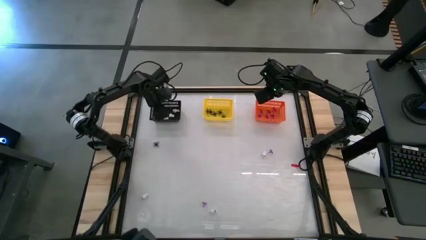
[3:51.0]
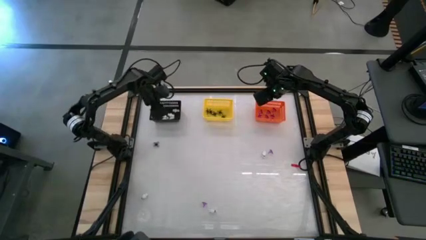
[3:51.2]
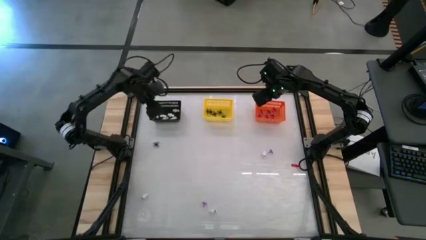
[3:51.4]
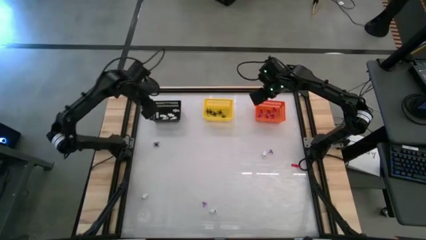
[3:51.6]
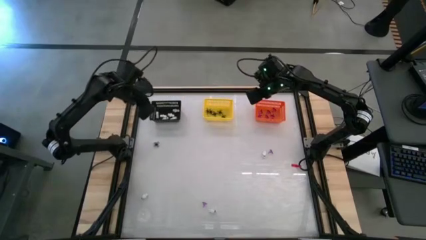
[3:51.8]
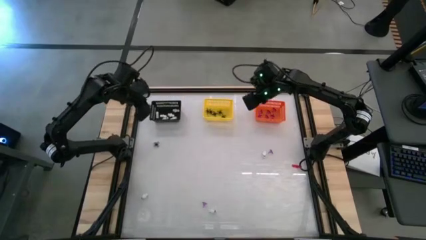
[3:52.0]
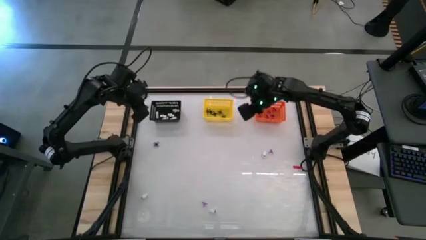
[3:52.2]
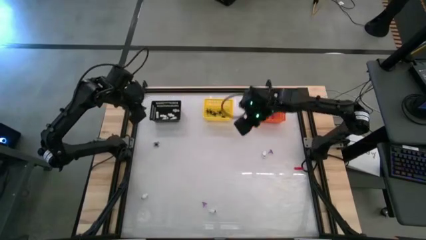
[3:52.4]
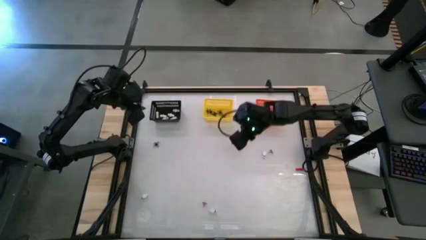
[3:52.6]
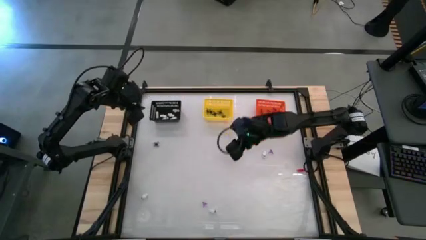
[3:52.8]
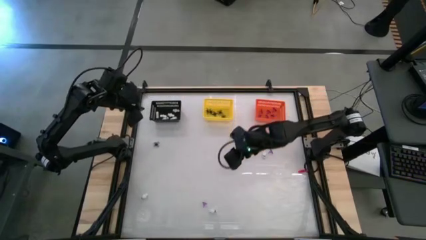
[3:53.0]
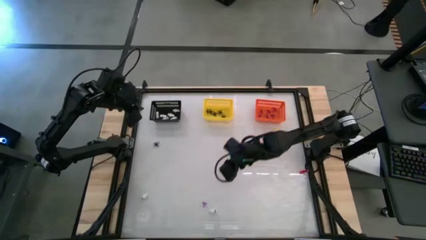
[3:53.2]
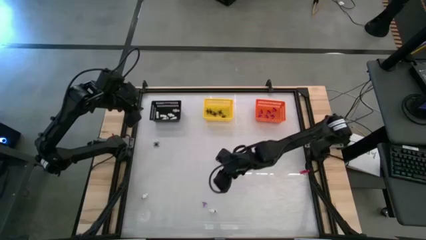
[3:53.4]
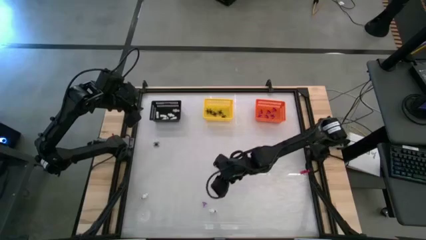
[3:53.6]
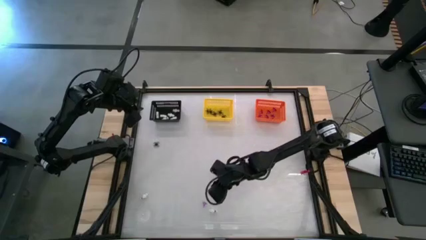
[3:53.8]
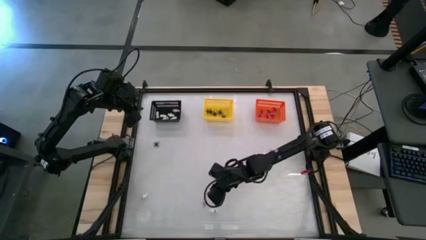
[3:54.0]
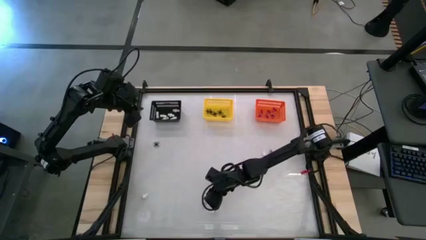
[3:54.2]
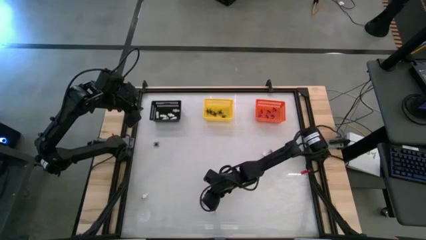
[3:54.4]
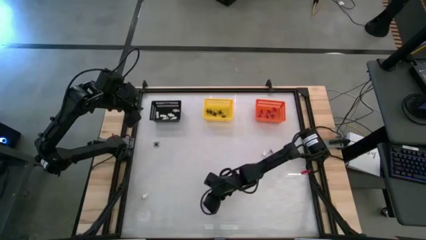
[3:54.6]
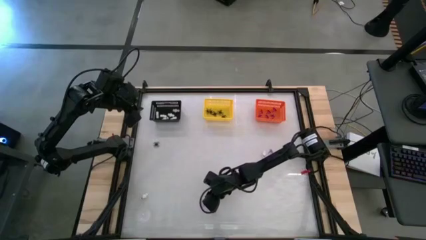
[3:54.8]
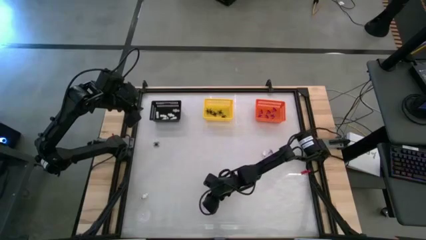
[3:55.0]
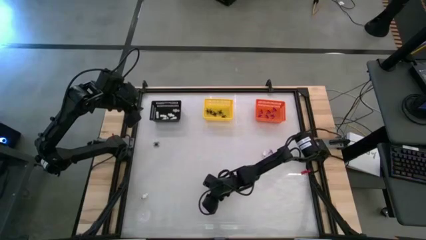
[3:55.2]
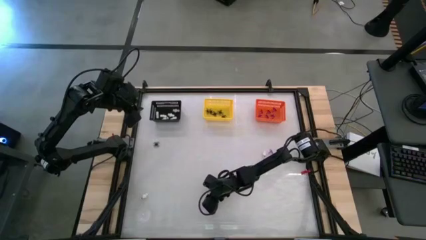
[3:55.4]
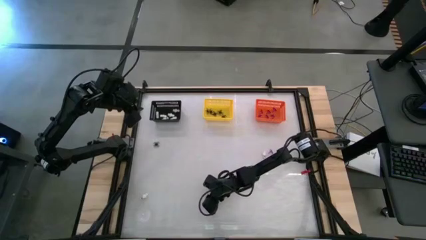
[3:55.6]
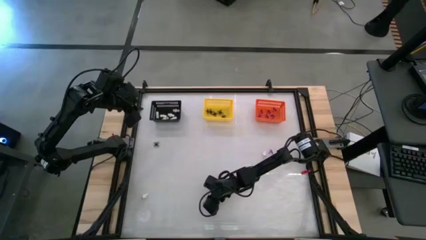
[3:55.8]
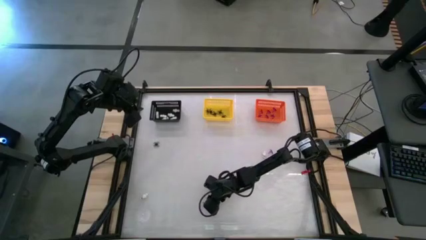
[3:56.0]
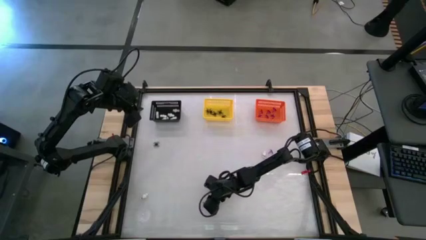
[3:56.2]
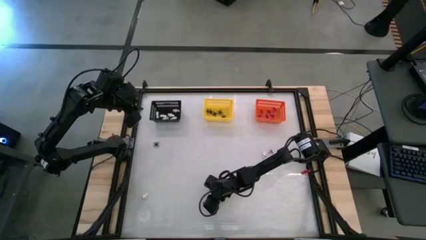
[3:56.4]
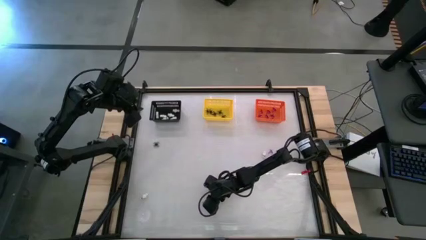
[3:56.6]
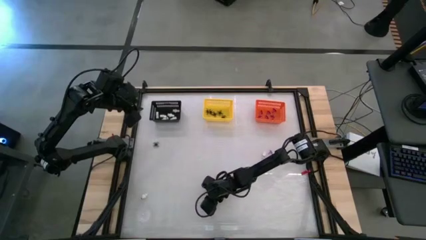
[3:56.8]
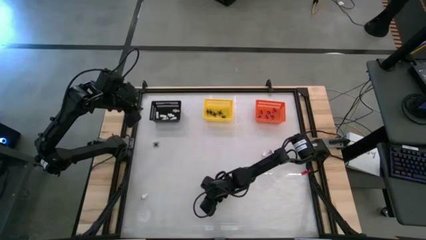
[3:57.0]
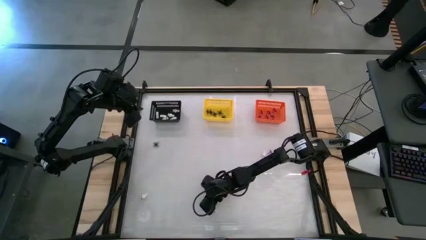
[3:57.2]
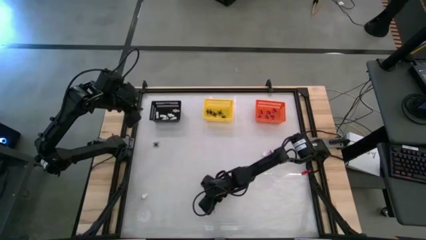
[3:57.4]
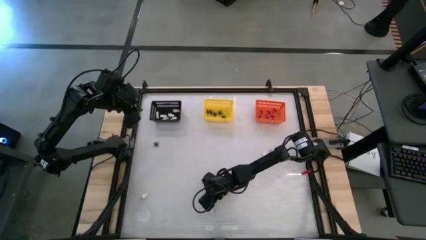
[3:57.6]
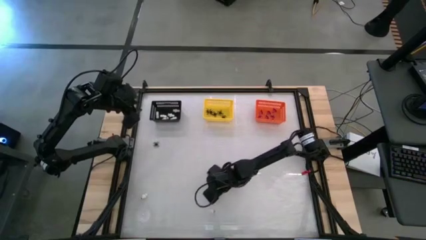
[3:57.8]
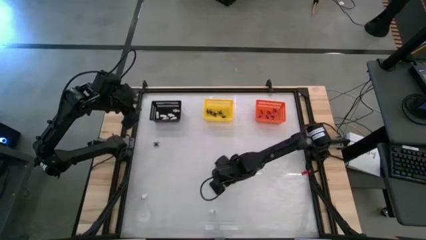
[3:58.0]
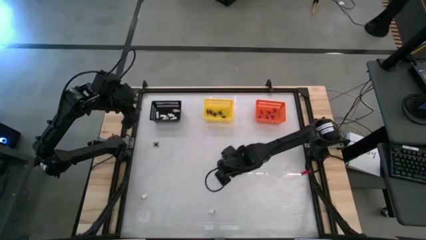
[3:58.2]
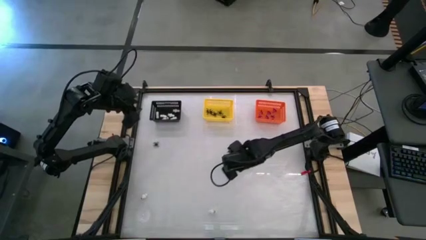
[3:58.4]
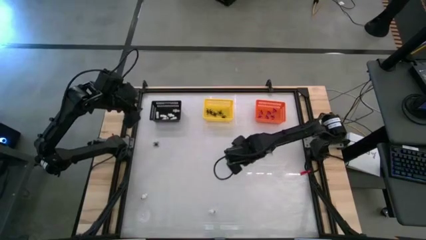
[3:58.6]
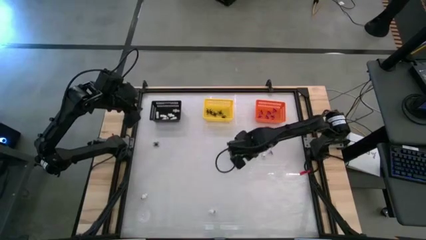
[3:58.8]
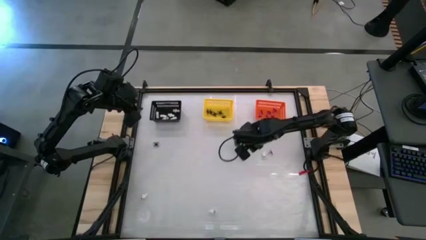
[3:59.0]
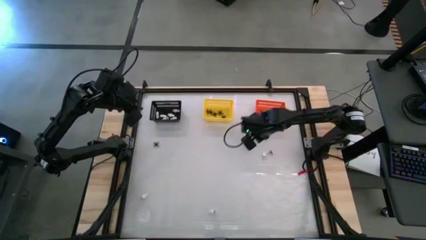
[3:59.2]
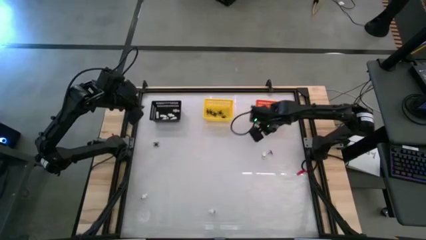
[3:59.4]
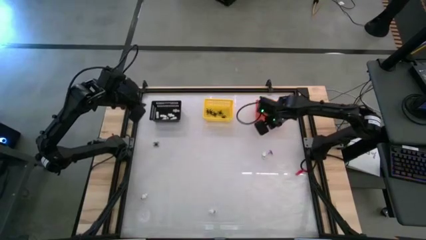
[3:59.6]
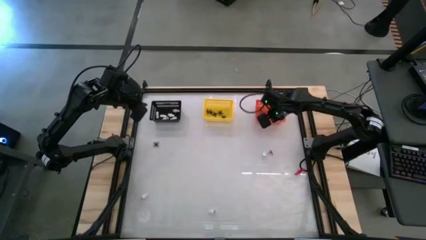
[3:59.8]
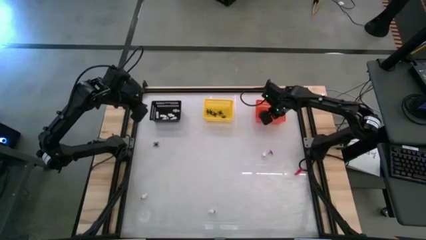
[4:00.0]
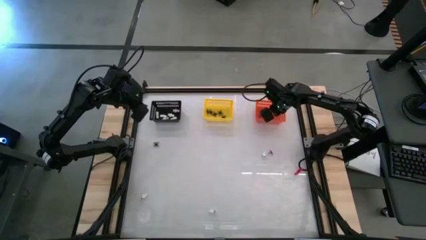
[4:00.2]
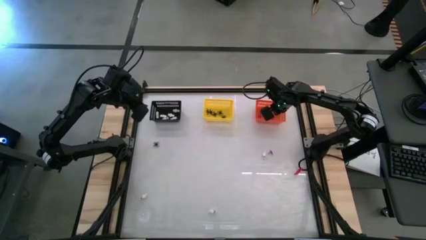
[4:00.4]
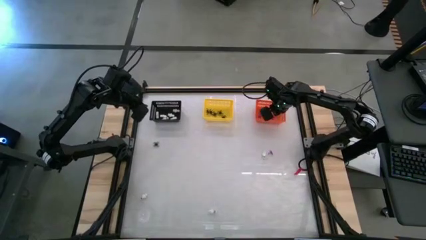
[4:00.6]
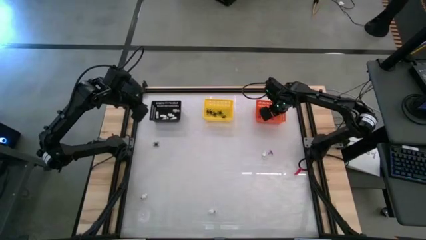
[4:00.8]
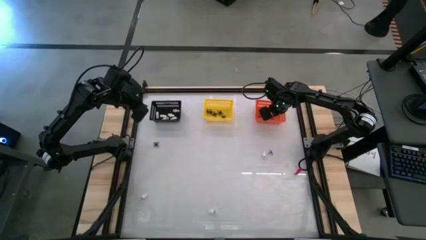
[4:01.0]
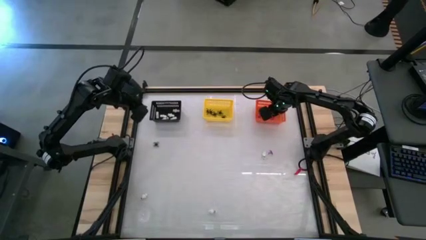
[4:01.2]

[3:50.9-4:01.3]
Task: Sort Halloween decoration
Put the purple witch hat toy into the orange basket
